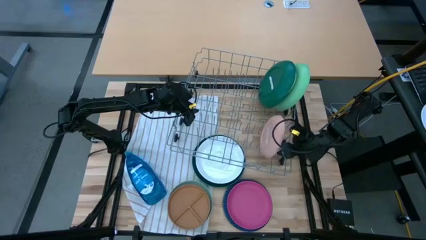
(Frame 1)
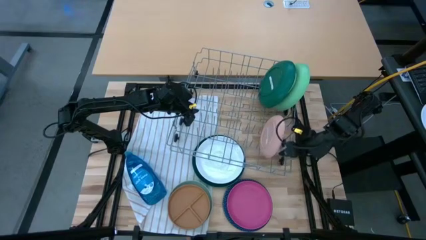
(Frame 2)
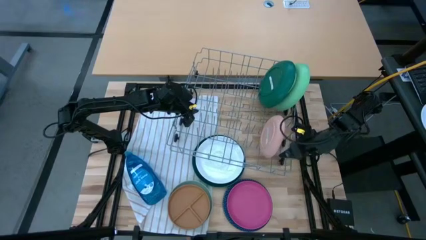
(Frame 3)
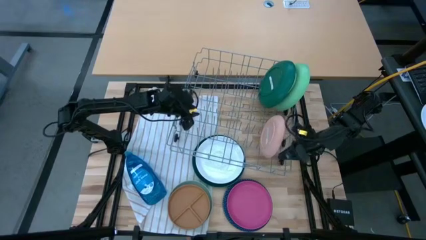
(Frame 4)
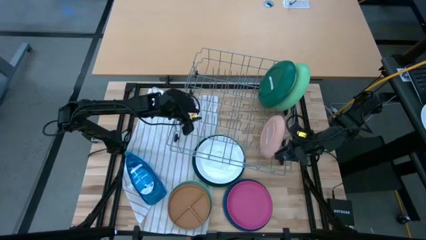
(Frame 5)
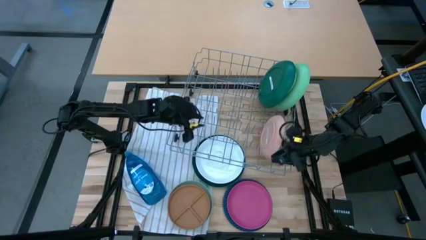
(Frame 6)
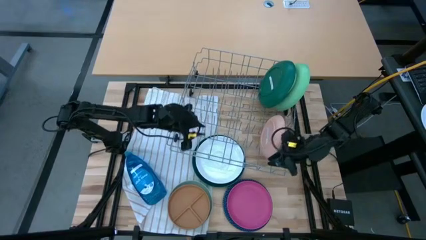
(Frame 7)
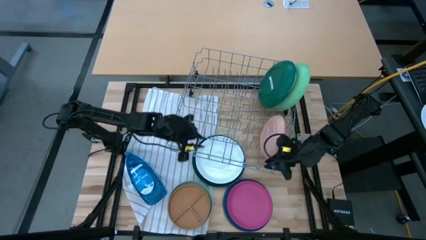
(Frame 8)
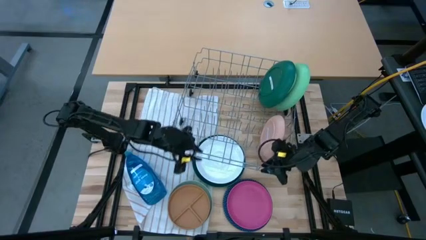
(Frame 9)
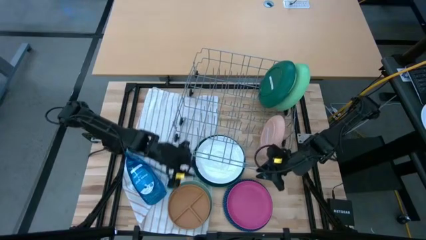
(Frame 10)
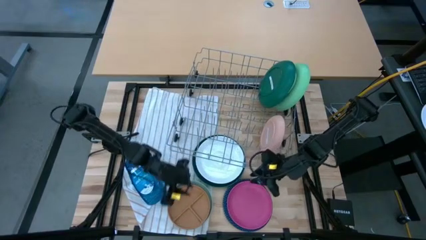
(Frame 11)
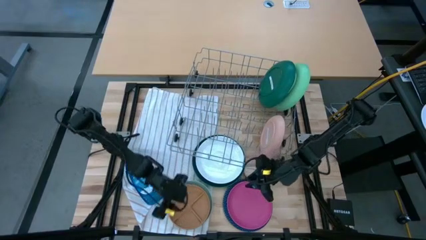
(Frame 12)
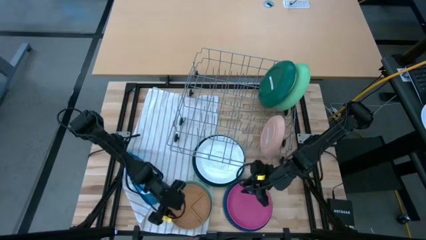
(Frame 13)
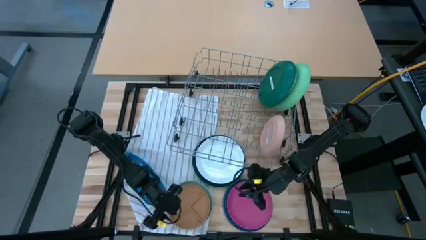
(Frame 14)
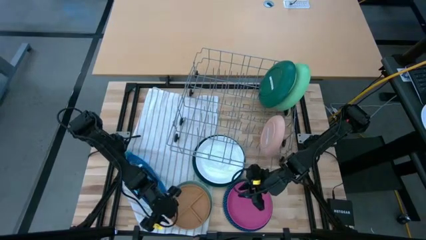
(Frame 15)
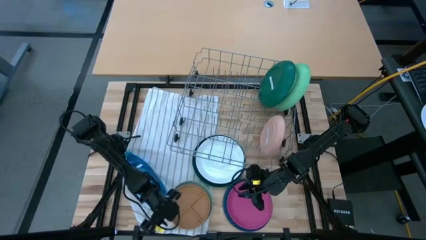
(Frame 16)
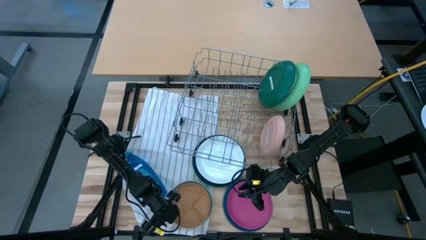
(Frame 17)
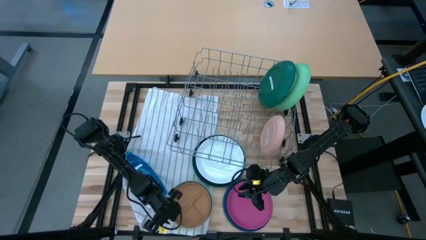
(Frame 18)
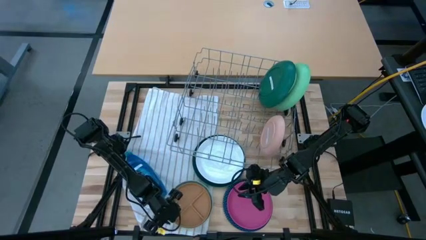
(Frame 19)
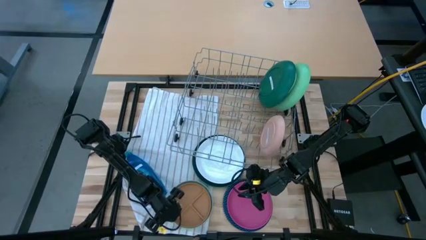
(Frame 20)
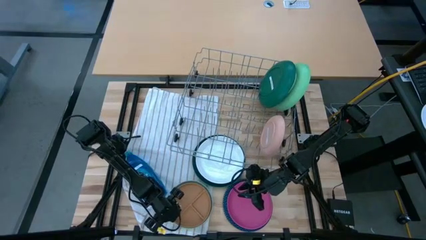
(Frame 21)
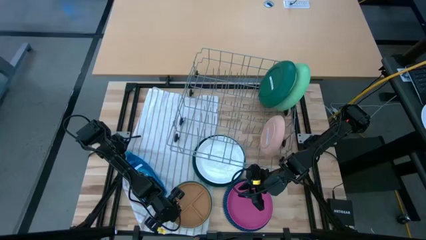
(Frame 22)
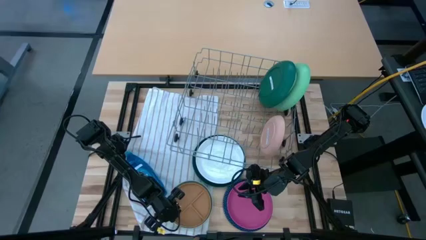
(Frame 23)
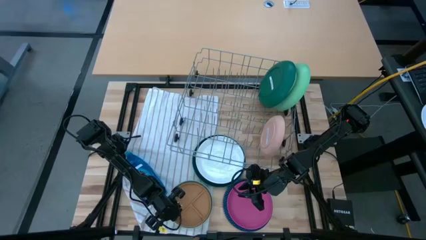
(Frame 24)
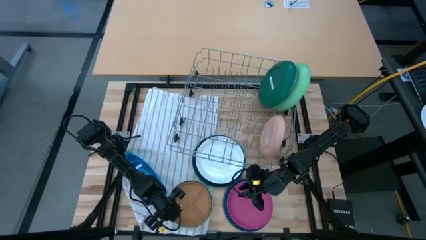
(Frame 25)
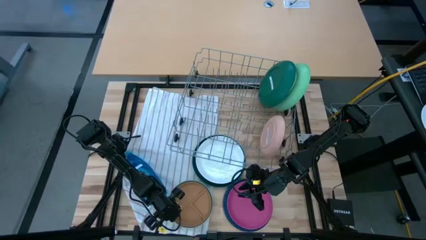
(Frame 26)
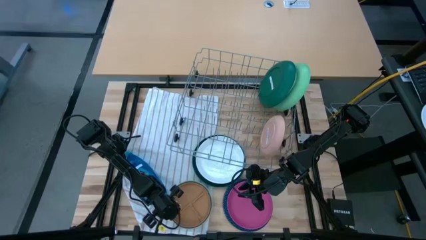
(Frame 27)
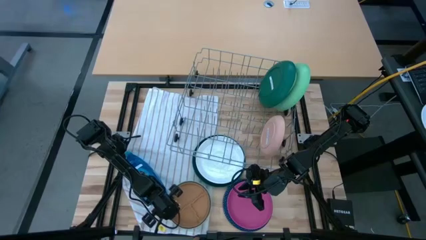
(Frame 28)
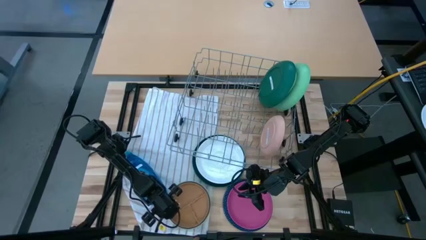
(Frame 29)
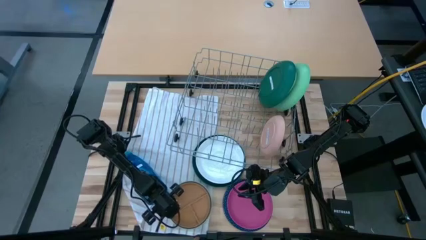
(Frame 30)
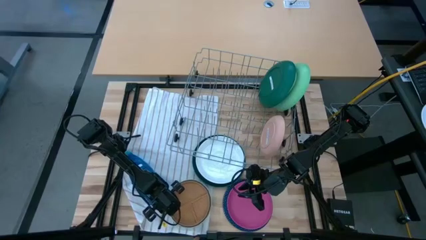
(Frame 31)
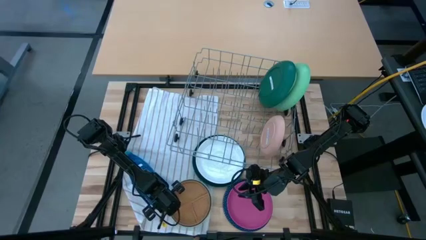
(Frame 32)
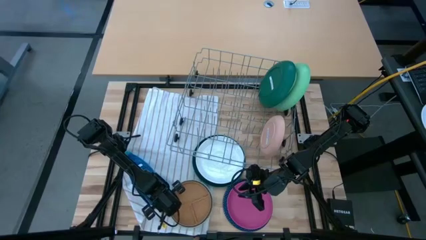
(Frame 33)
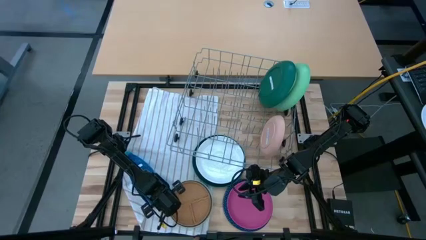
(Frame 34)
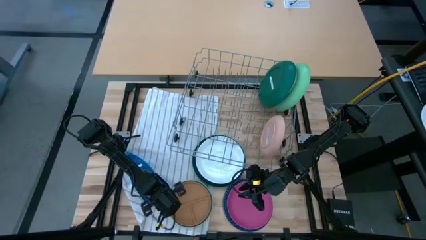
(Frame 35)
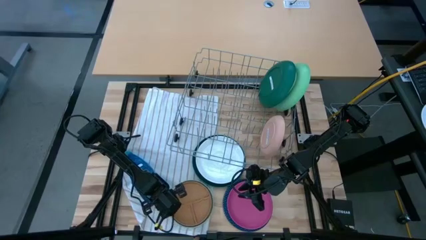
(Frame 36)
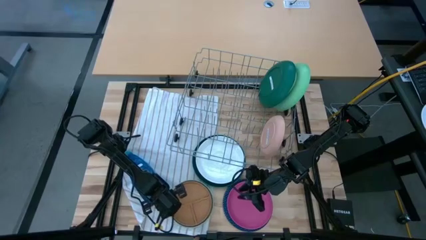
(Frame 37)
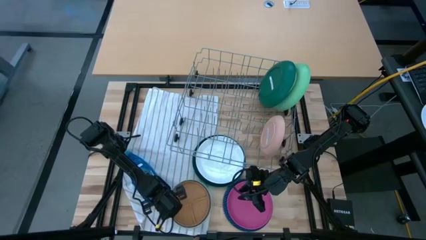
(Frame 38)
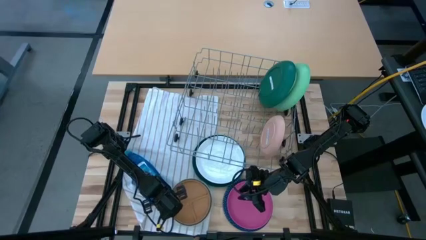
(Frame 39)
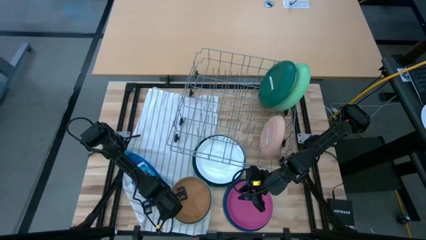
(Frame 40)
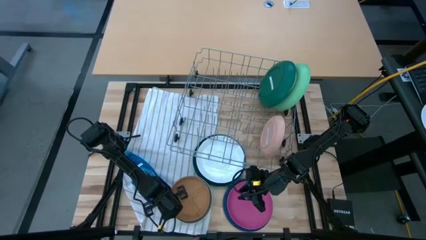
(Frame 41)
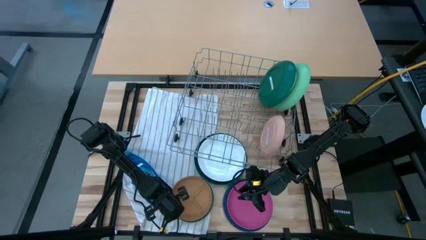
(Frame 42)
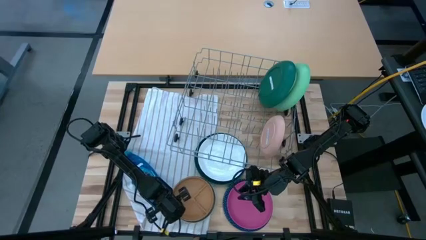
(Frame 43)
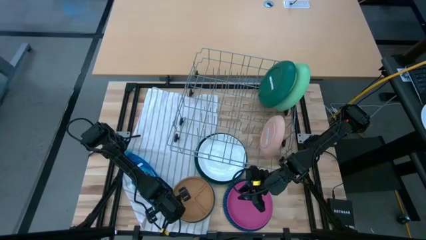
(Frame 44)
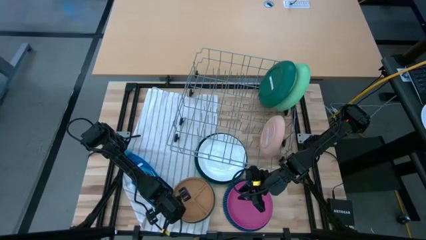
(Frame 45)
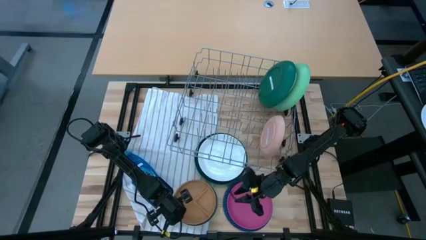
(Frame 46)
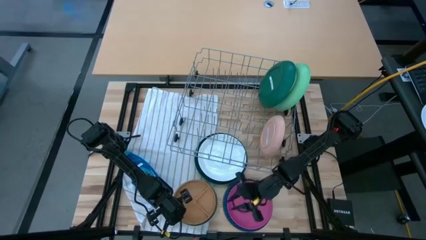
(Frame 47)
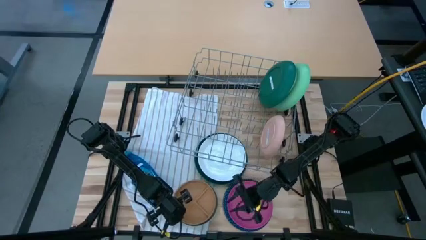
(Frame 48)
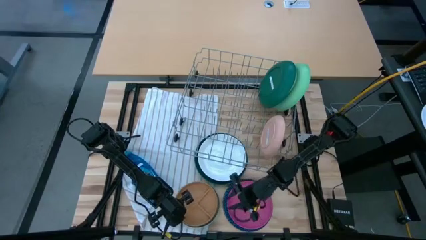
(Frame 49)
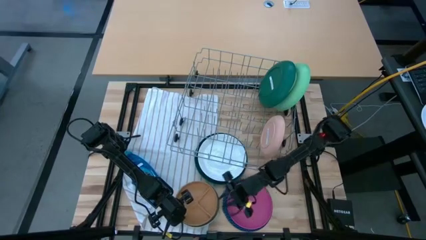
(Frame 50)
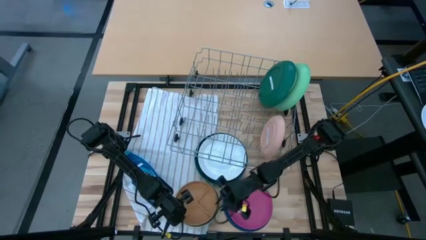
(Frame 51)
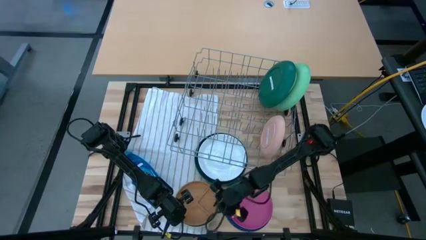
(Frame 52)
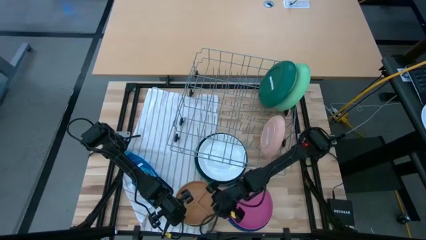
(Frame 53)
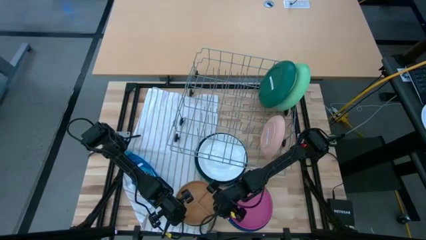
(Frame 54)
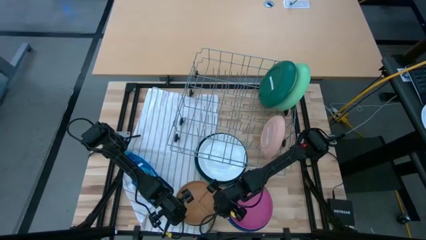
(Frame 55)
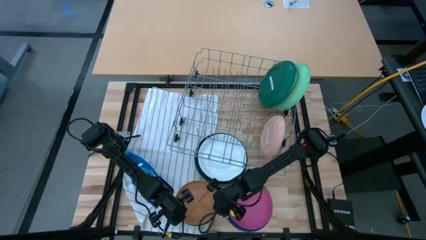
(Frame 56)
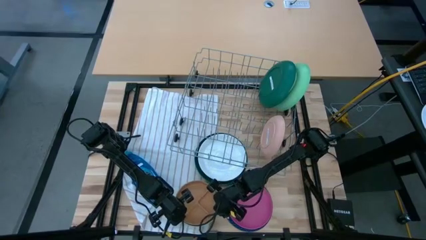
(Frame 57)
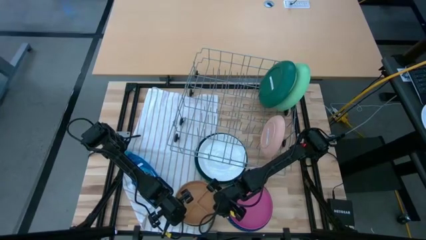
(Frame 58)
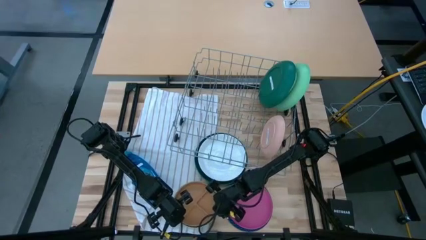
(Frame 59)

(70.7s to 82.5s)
Task: Sort dishes
Put the brown plate in the dish rack

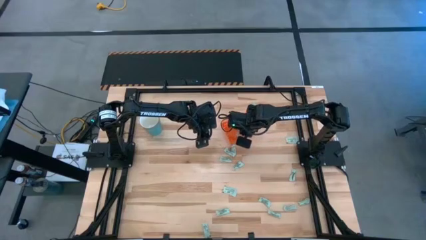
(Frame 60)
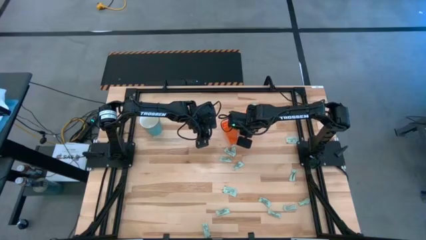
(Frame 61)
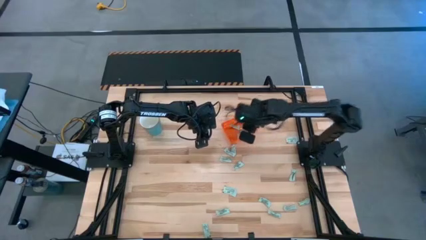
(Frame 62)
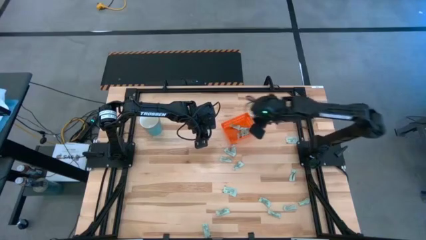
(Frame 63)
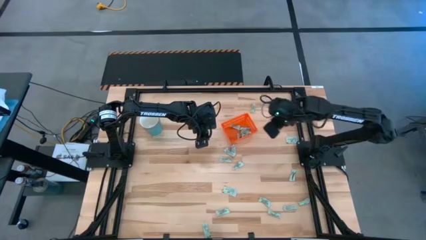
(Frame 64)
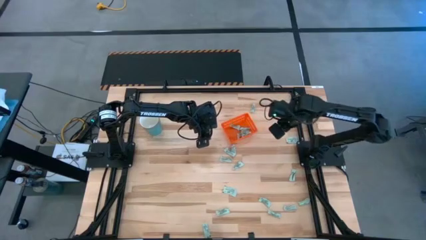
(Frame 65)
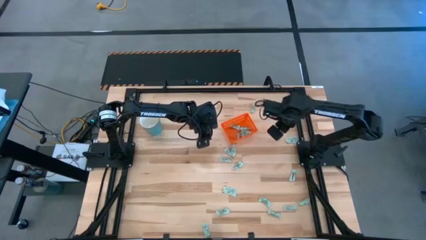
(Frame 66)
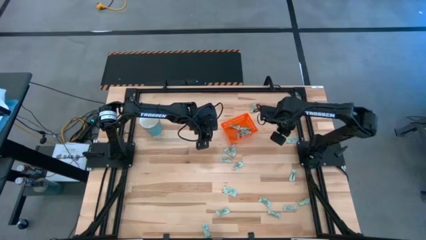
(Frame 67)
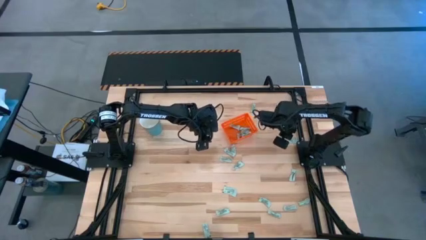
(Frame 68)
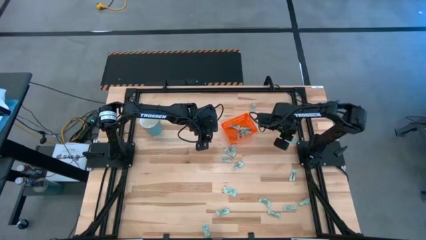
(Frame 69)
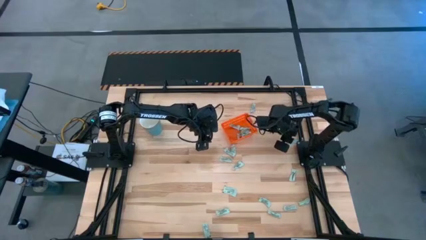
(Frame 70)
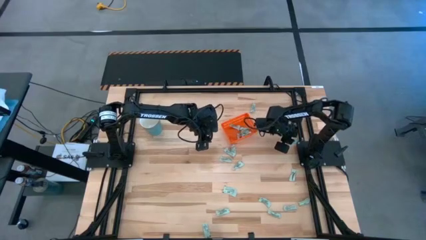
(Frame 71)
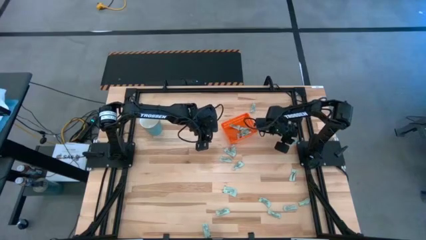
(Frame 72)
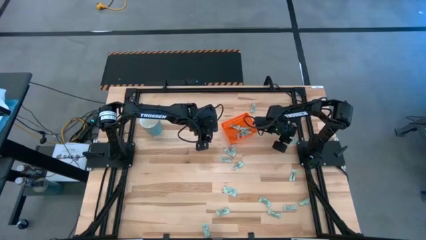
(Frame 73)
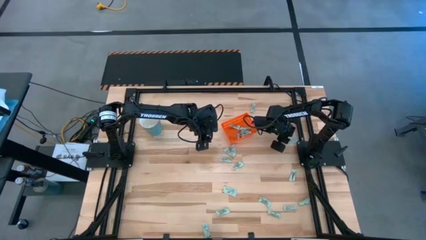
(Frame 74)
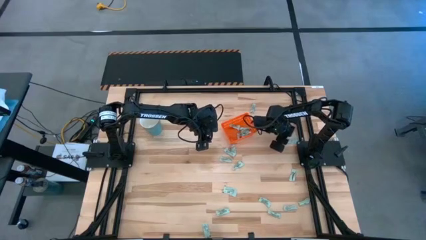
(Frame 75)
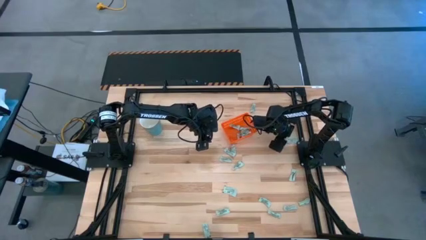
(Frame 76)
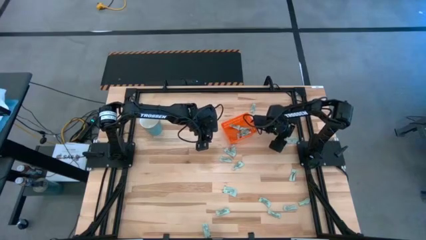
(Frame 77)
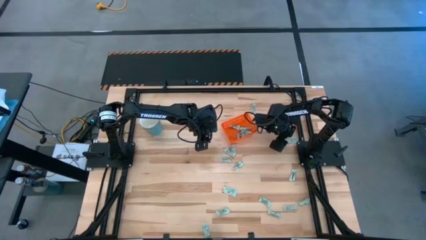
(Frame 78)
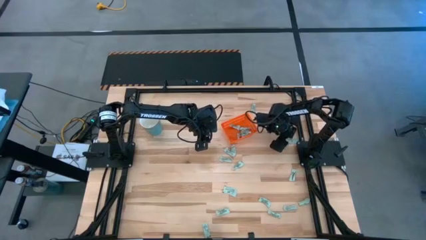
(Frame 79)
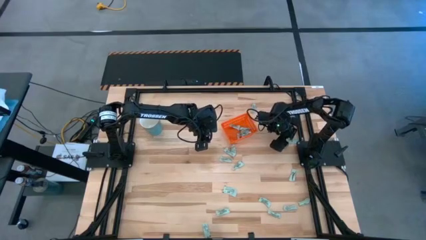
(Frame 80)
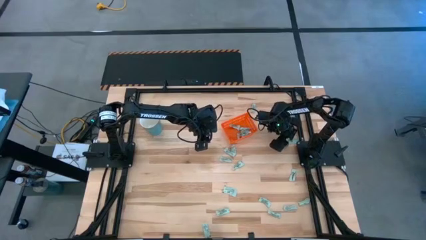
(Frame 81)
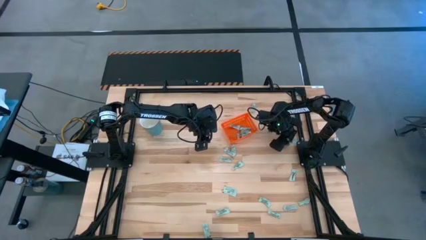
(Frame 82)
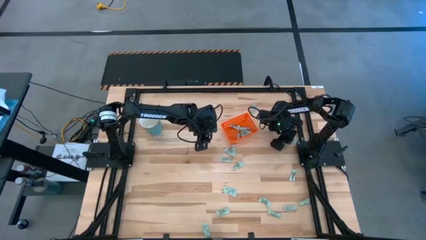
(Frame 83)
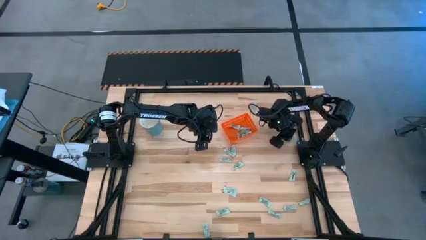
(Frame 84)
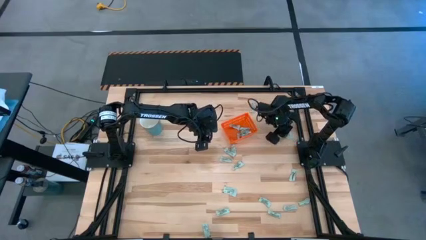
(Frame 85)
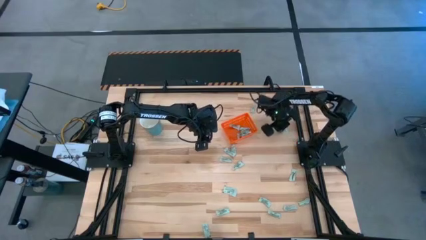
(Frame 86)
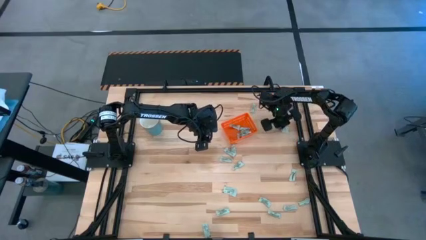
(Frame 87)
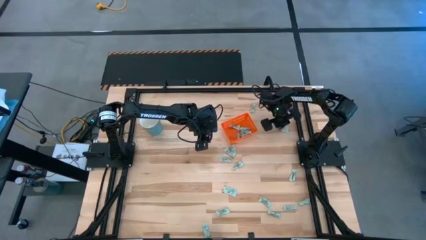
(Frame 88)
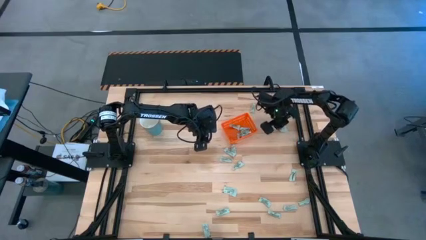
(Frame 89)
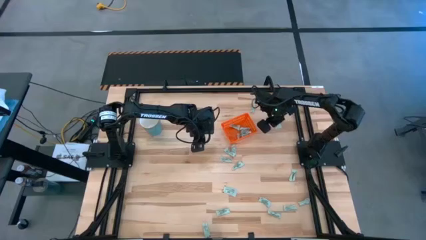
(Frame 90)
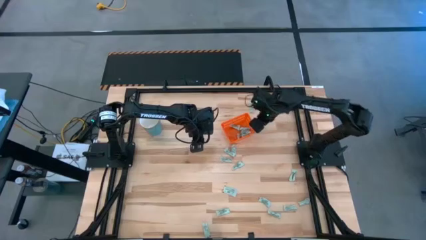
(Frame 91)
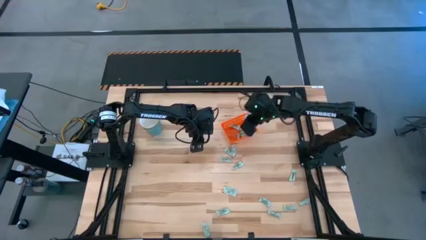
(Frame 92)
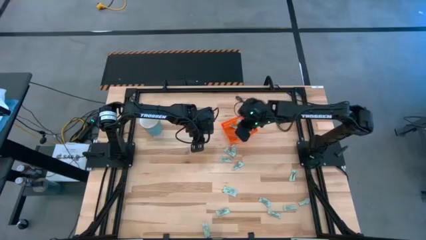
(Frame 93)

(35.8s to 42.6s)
Task: Pick and place Stevia / Truvia into bins
Put the stevia packet into the bin
